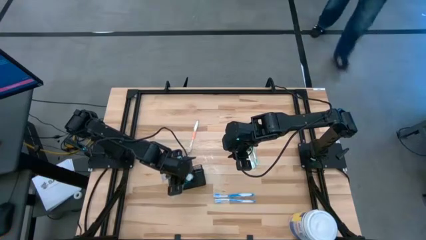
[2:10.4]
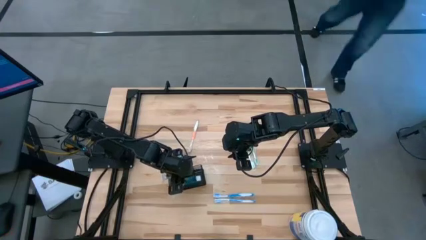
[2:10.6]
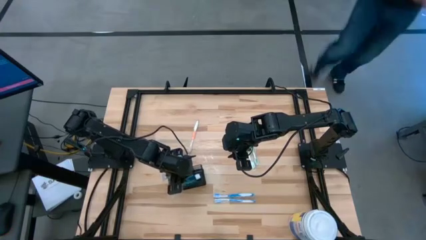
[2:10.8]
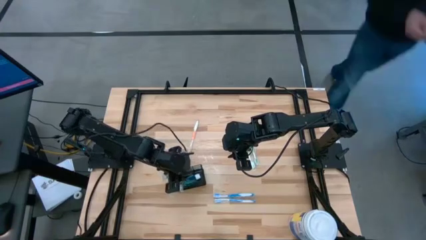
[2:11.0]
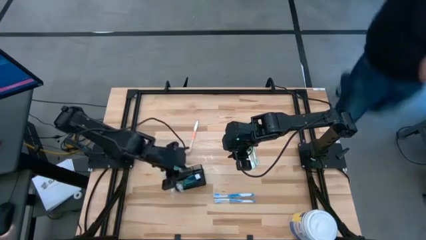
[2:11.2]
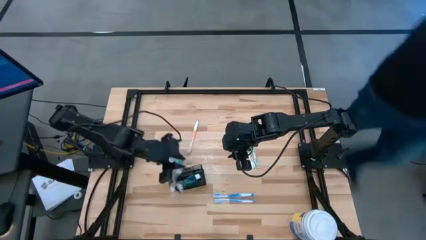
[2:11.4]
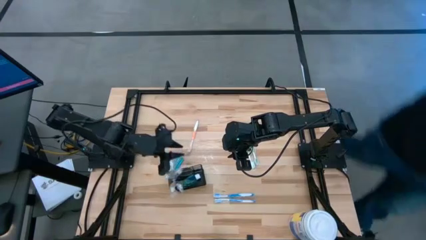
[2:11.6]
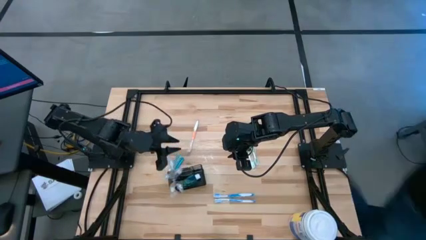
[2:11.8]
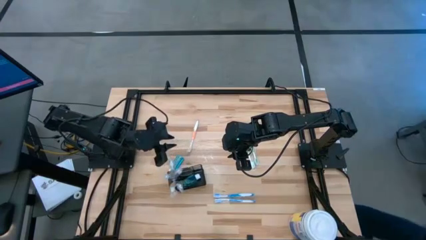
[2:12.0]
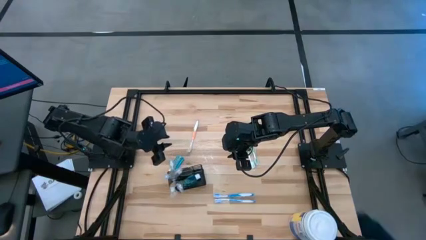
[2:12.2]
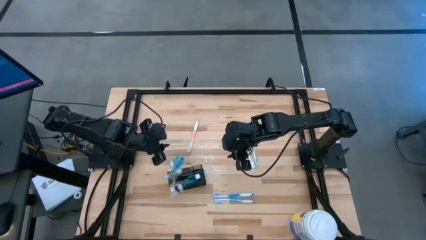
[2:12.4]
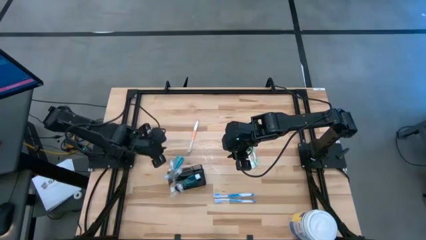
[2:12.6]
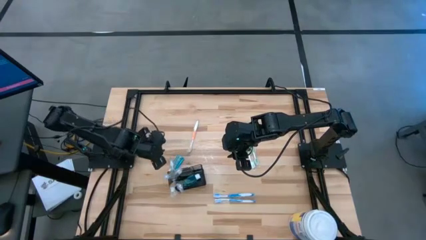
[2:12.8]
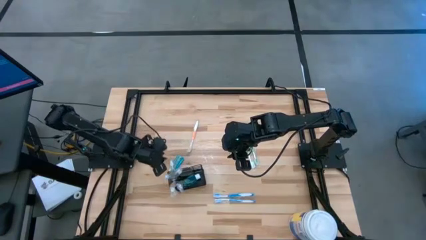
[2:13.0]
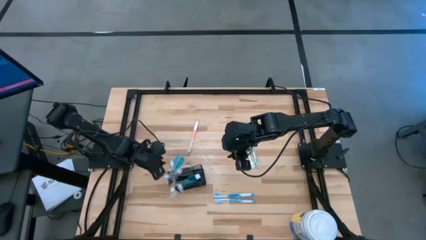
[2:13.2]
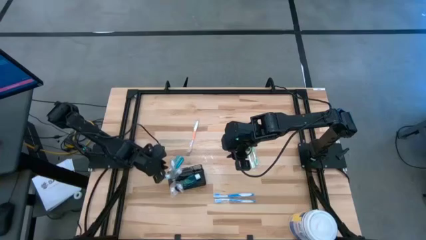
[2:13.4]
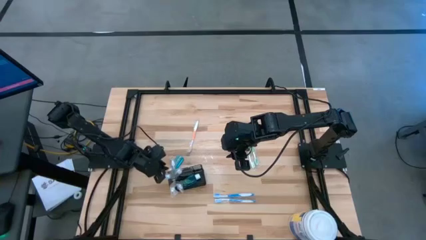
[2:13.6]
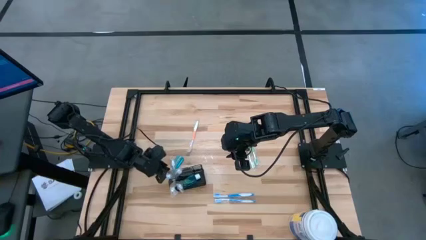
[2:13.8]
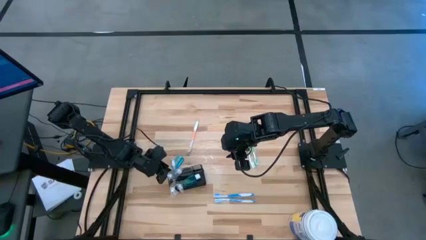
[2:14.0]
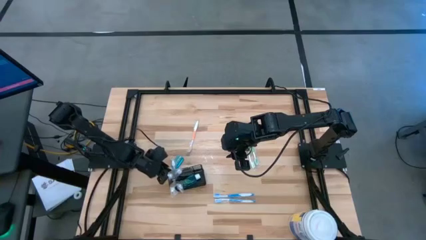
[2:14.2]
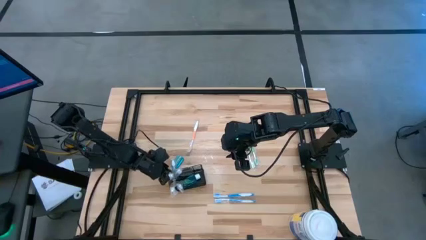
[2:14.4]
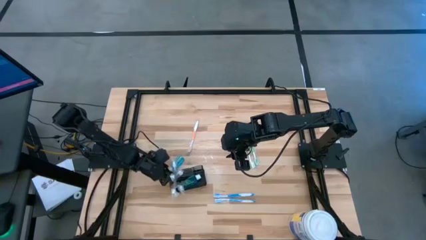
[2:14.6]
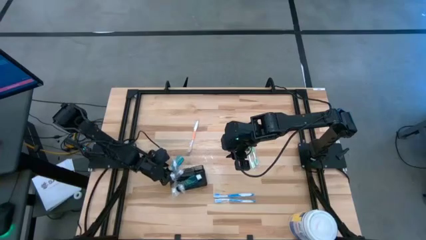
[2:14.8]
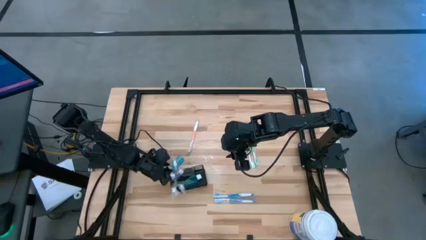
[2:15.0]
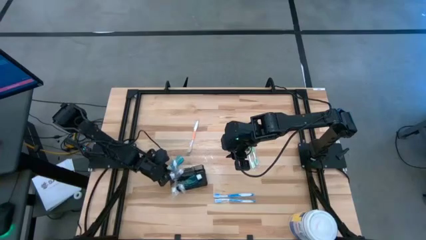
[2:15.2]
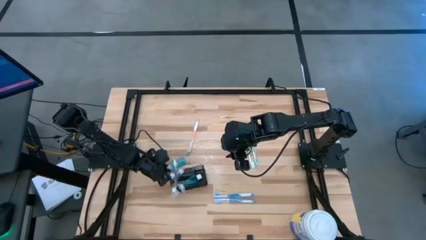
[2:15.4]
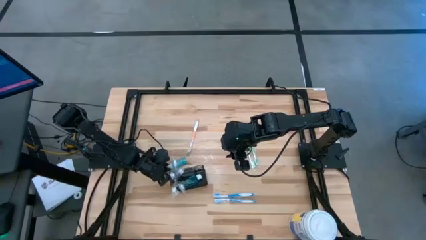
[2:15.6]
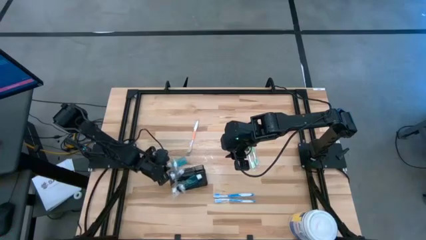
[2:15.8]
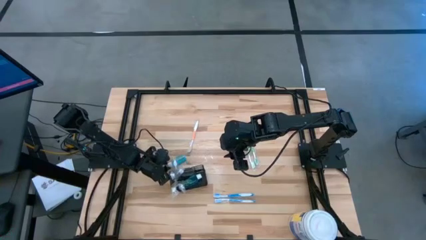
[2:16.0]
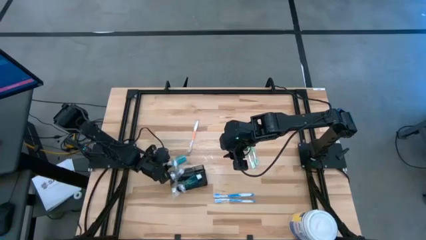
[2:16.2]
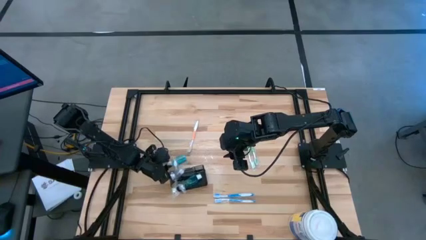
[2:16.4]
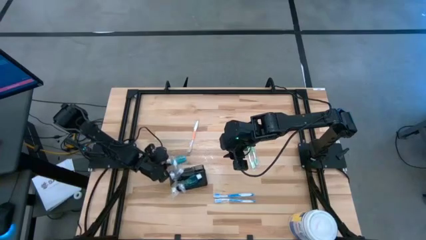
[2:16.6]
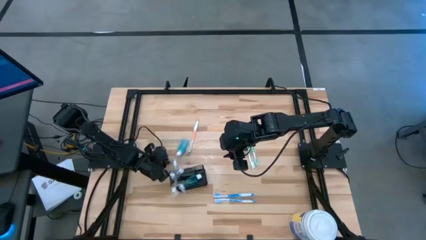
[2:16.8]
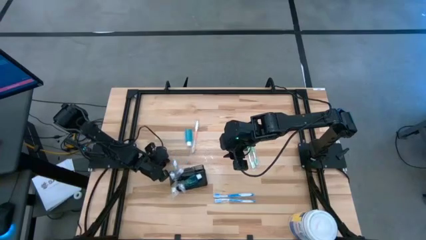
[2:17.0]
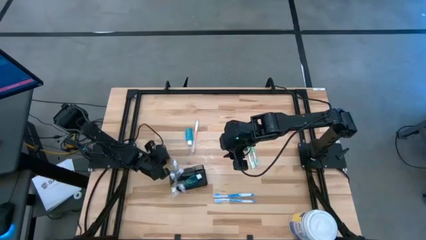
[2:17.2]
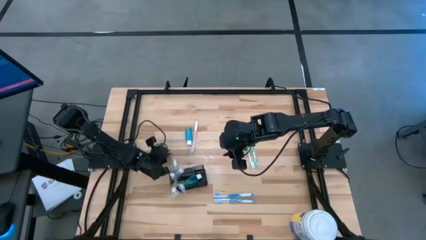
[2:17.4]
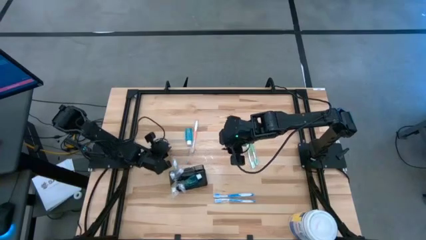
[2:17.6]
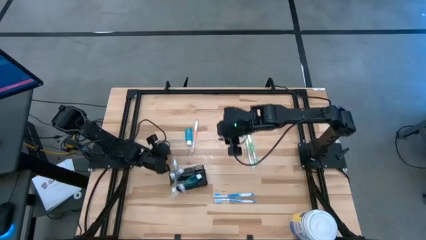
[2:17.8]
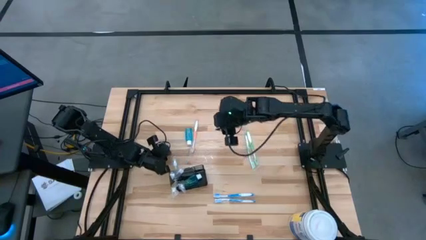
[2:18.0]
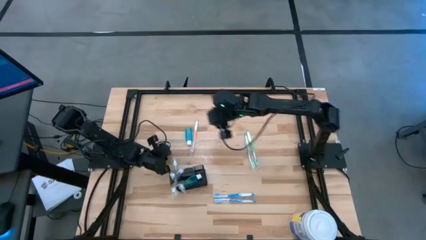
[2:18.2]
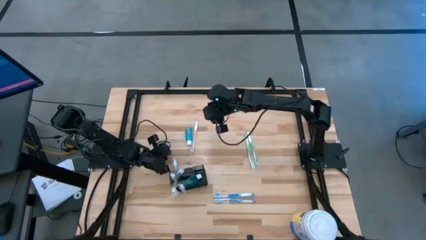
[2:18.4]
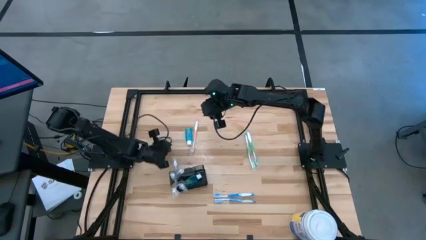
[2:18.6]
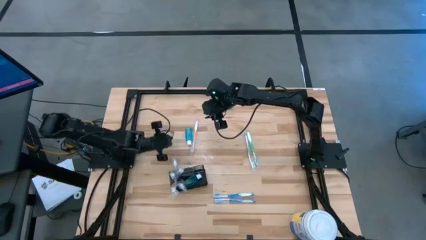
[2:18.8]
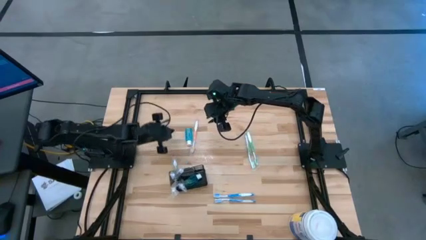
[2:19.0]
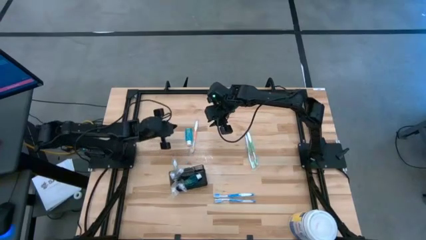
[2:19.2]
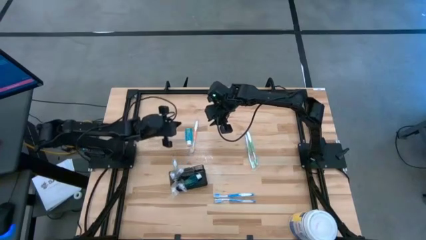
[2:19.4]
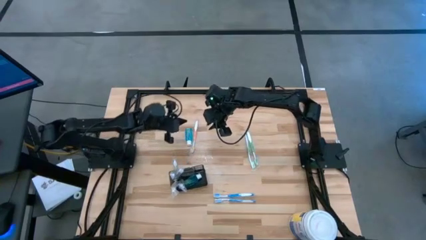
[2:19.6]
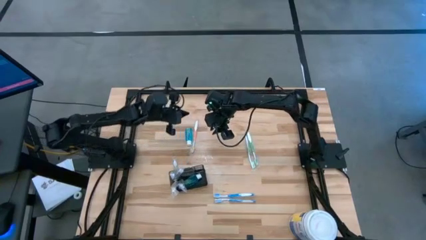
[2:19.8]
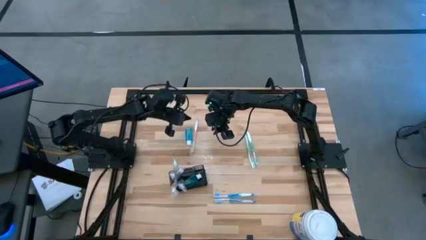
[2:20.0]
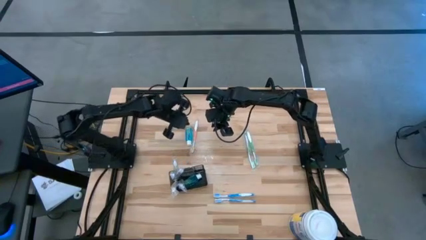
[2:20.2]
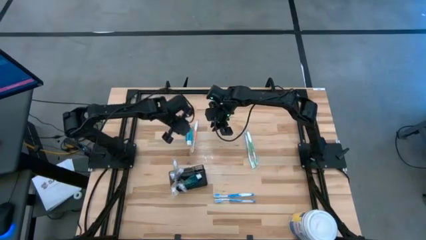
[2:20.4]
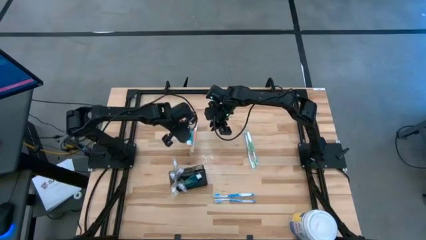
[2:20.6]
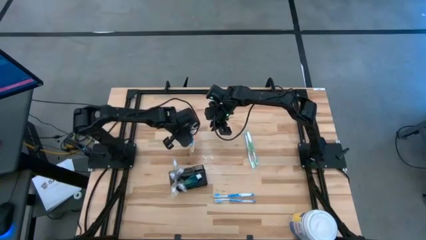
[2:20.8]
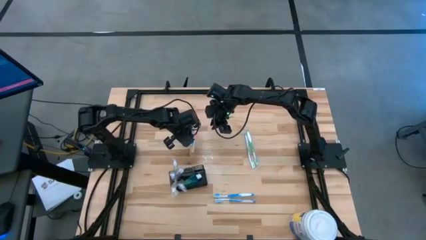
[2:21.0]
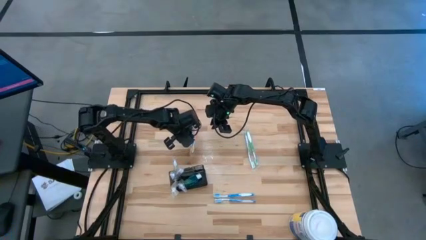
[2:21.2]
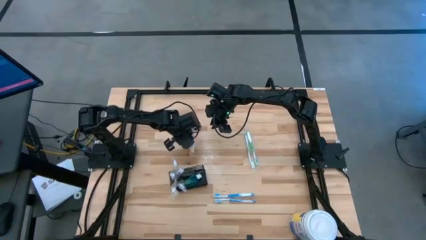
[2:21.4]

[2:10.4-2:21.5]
Task: Pick & Place toothbrushing station
Put the mouthwash into the black toothbrush rack

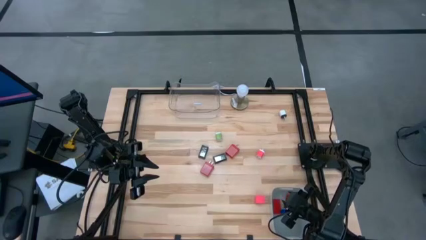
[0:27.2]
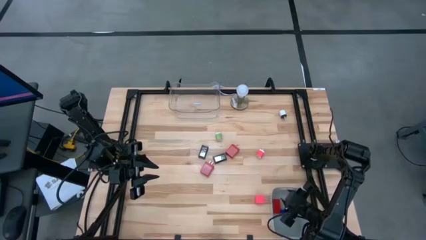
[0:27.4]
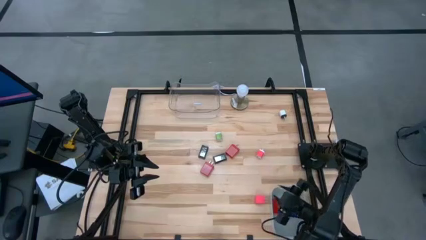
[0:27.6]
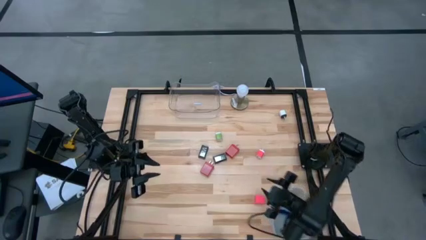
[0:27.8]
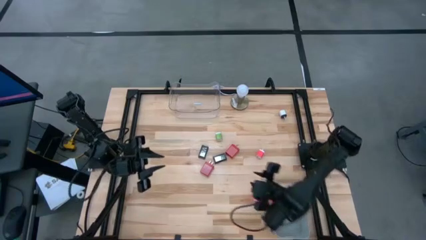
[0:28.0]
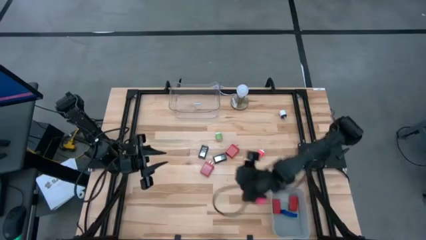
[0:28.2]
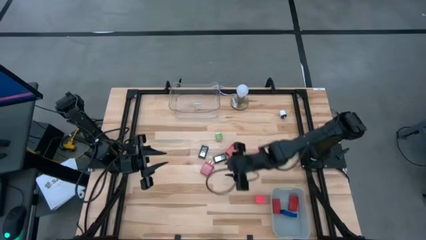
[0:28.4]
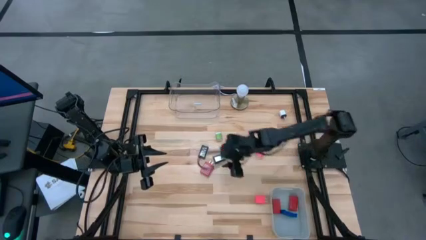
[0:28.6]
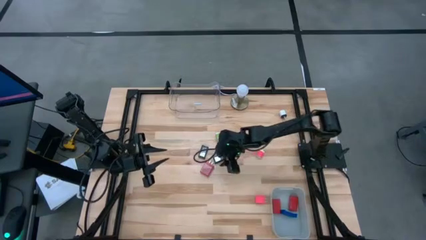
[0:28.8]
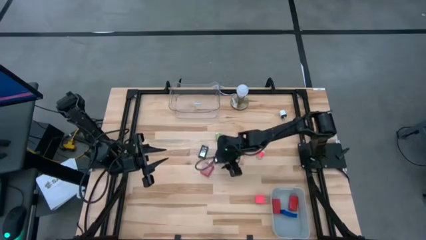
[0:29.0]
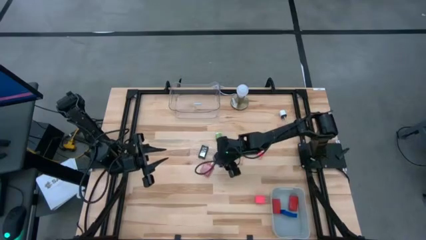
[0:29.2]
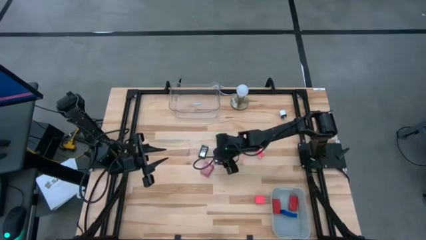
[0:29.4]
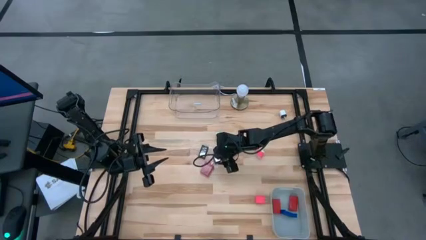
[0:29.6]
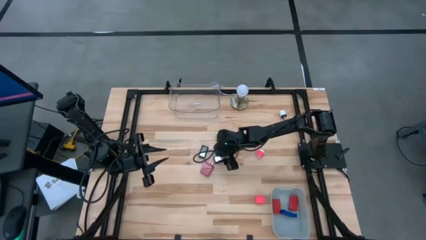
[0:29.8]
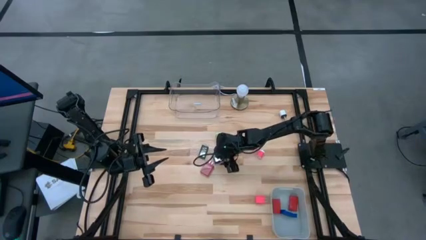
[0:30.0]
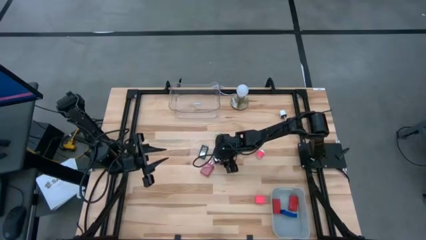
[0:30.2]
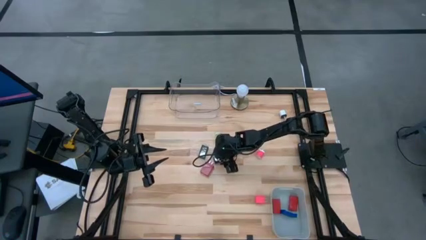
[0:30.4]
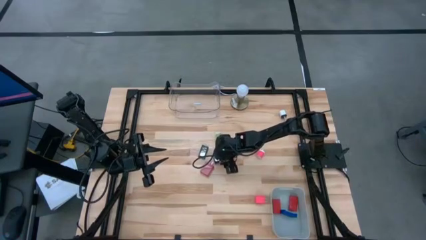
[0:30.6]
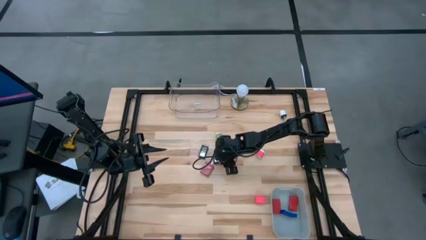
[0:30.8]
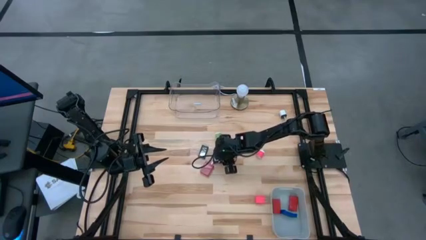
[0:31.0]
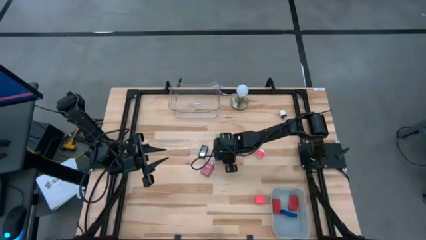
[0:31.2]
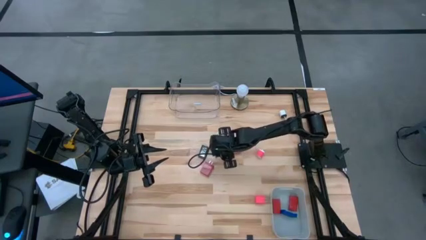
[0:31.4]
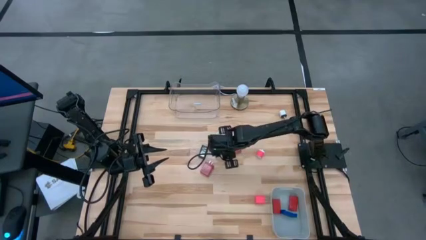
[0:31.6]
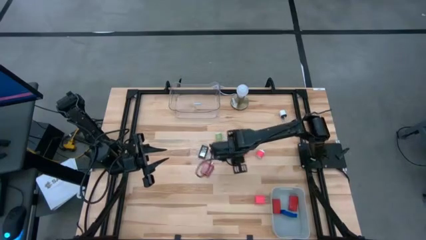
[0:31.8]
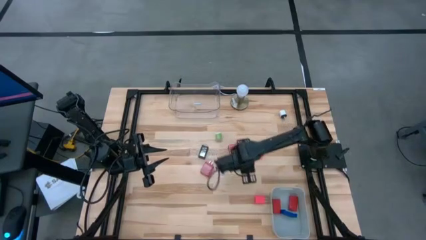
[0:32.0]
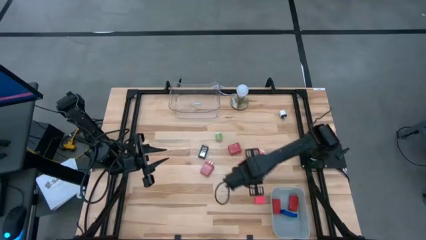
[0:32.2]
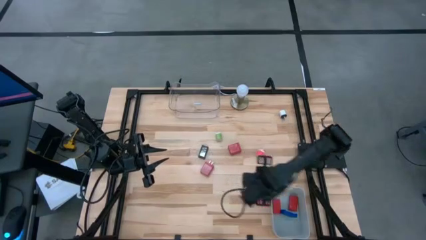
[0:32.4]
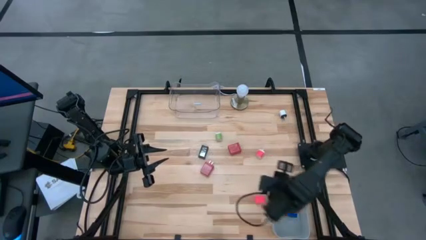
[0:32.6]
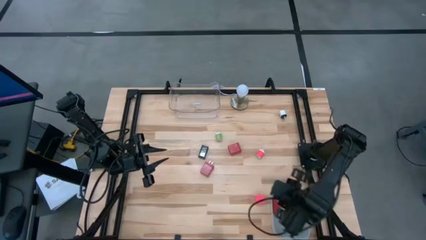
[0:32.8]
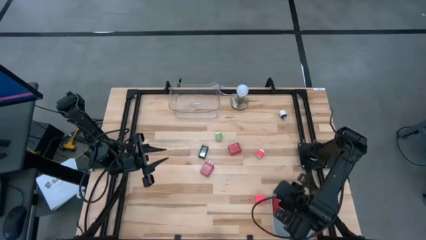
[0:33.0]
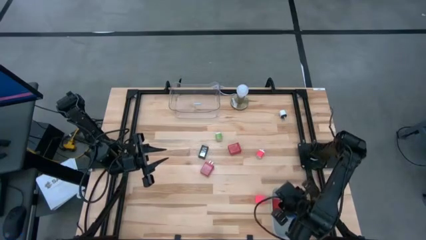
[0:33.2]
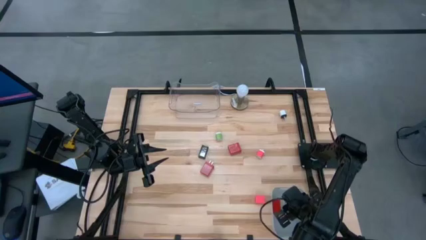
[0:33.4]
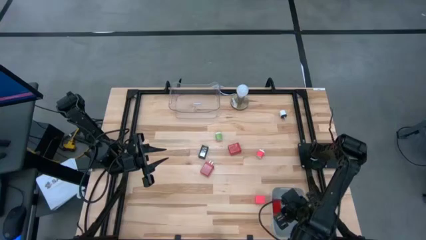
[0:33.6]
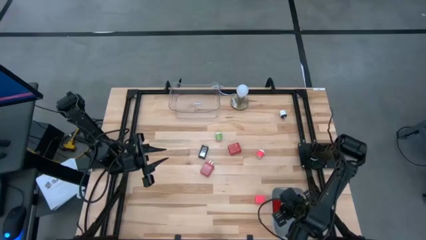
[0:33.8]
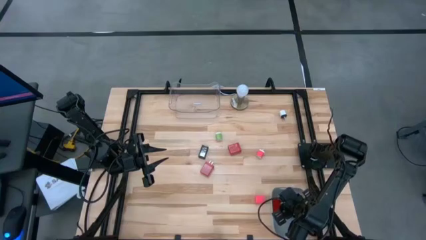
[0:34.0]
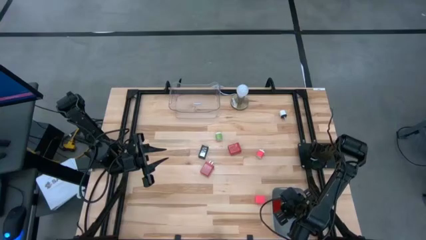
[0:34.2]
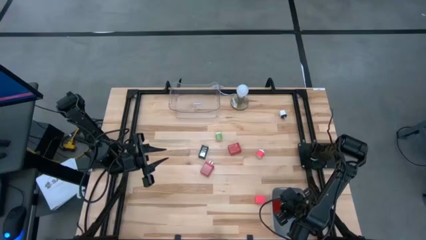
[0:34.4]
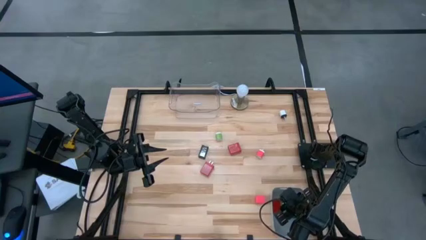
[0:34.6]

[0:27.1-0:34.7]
Task: Pick & Place Office items
Put the right black digital clock into the gray bin
